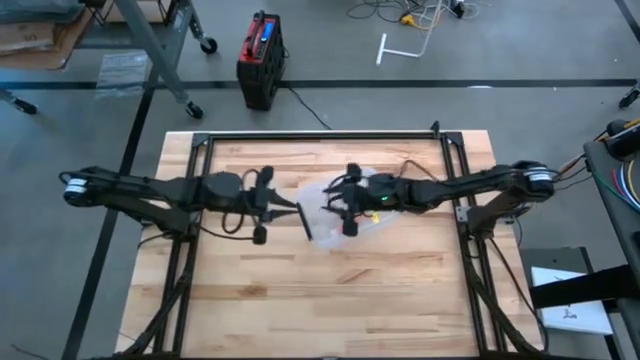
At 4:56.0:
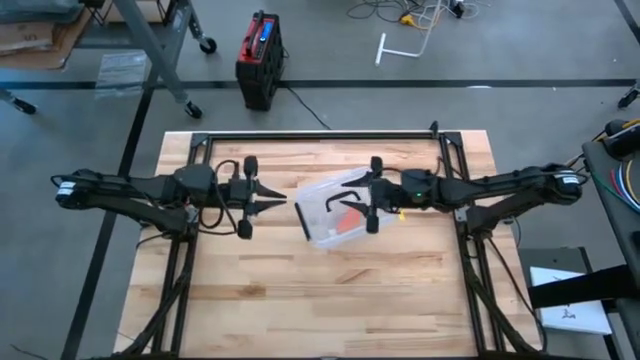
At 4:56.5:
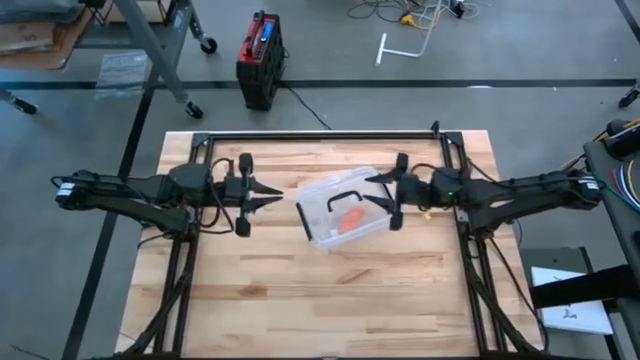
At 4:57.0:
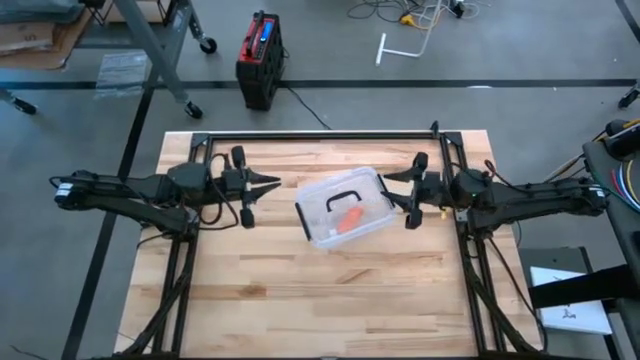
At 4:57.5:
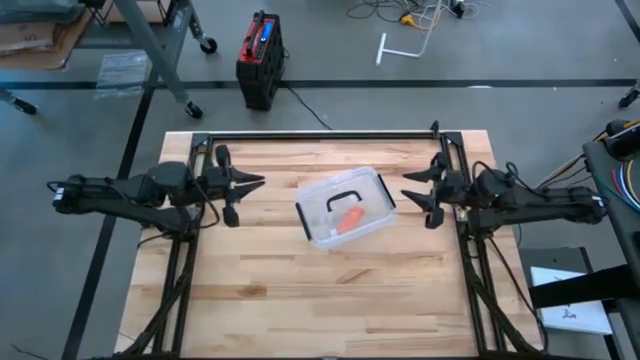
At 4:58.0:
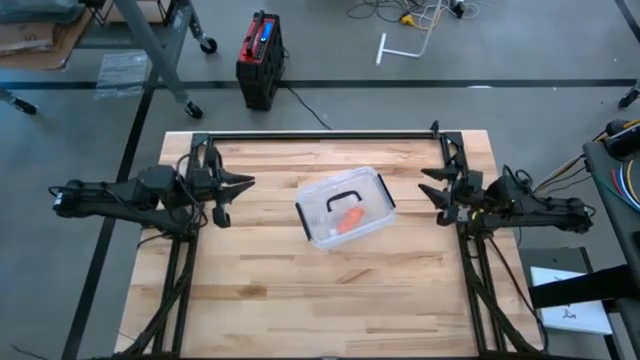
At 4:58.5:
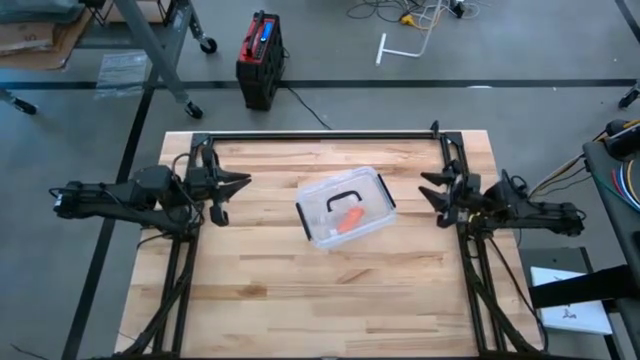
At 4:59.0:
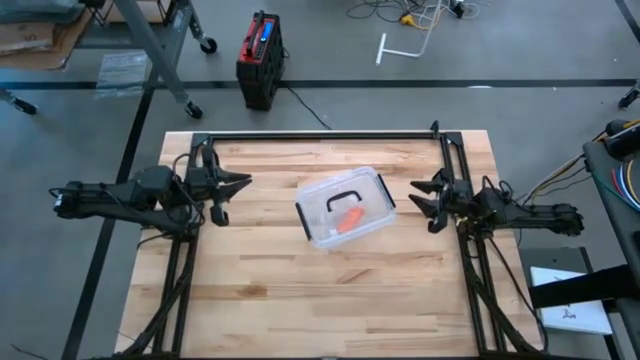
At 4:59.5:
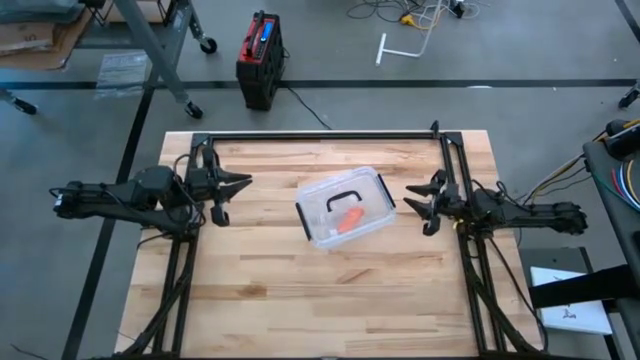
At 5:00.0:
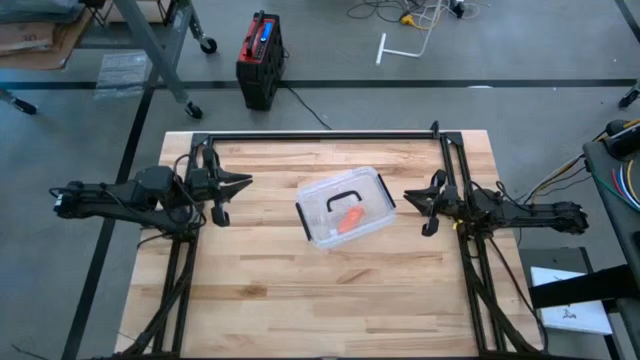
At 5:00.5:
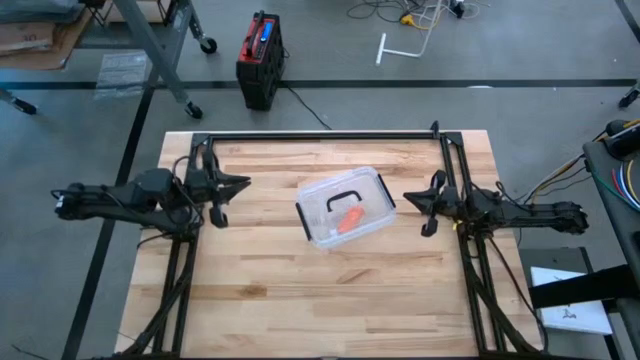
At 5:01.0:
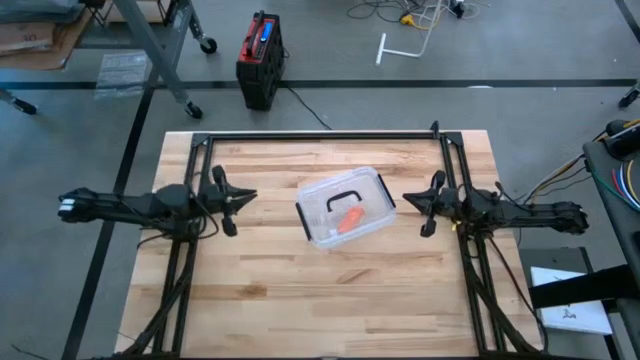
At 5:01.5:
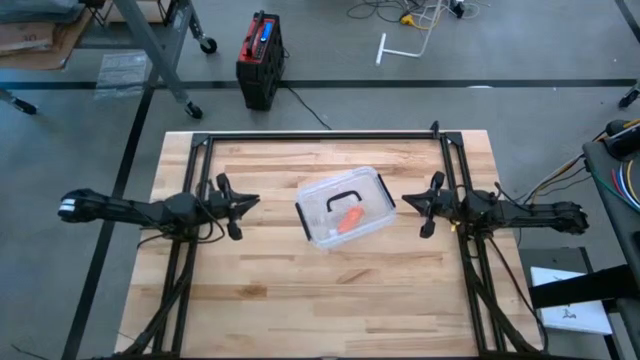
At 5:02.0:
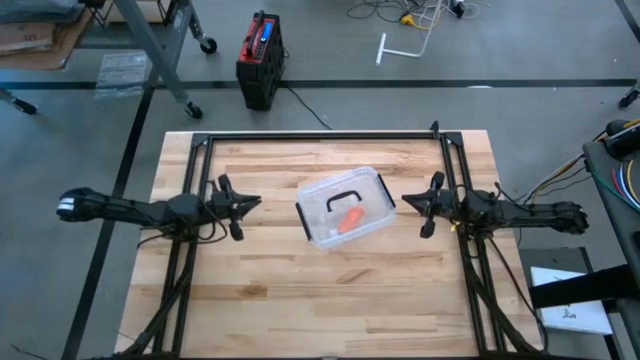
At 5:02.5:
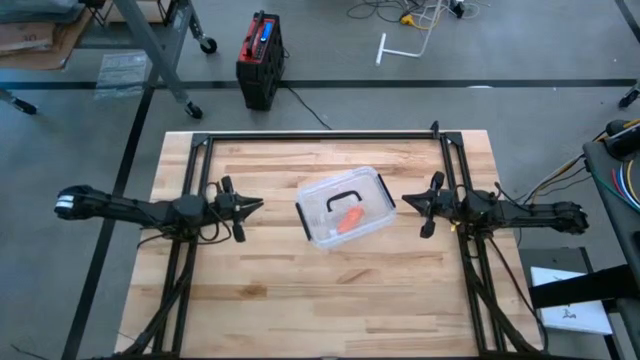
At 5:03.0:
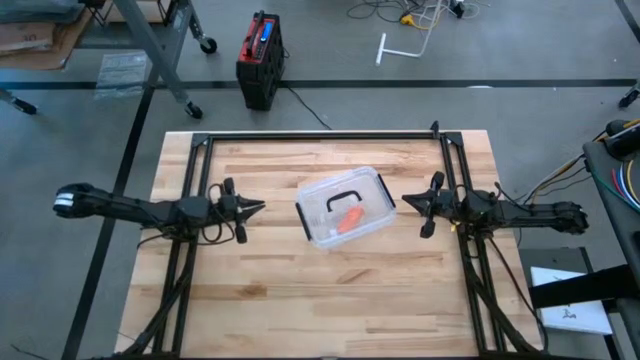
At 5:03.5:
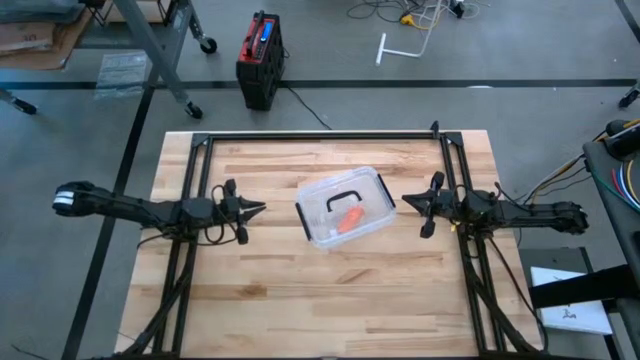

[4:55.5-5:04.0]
Task: Roll bandage
Return to Home Position

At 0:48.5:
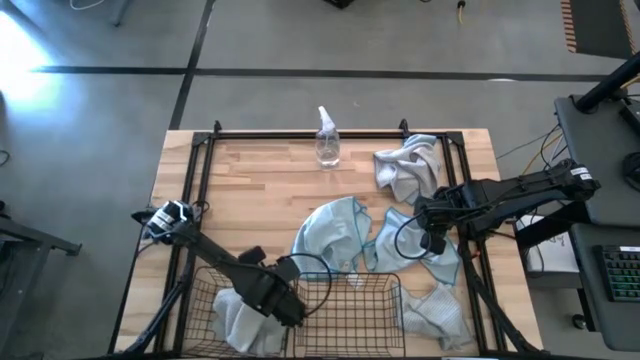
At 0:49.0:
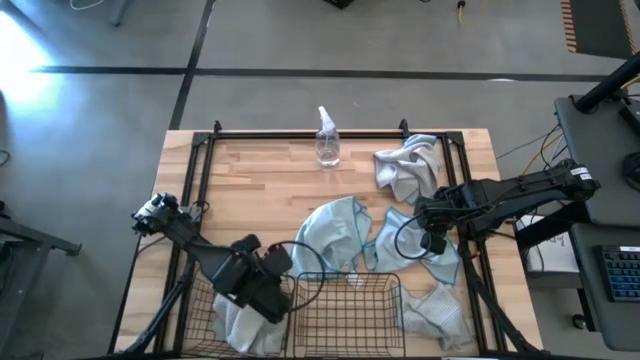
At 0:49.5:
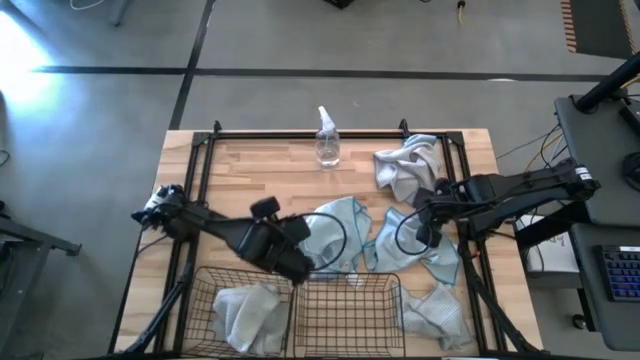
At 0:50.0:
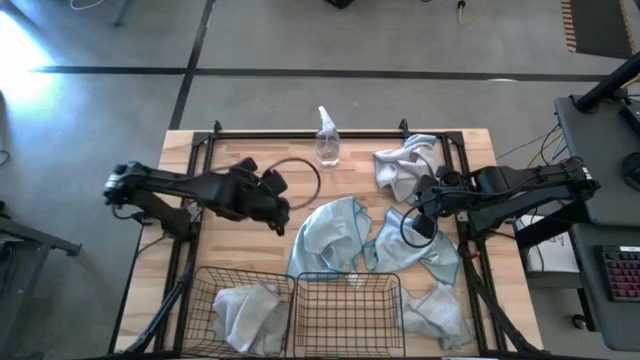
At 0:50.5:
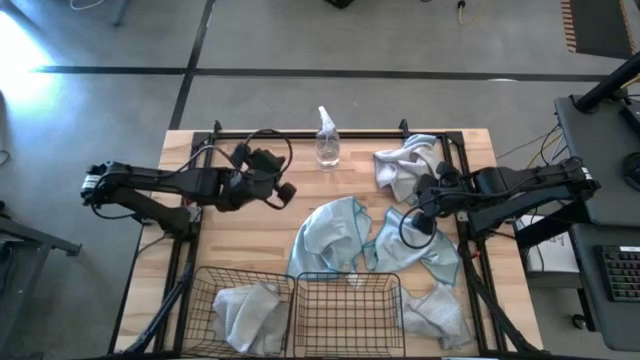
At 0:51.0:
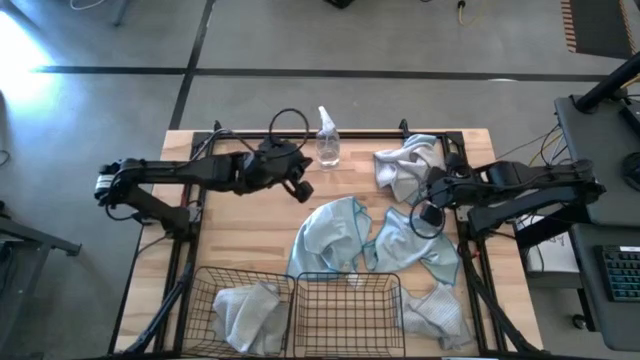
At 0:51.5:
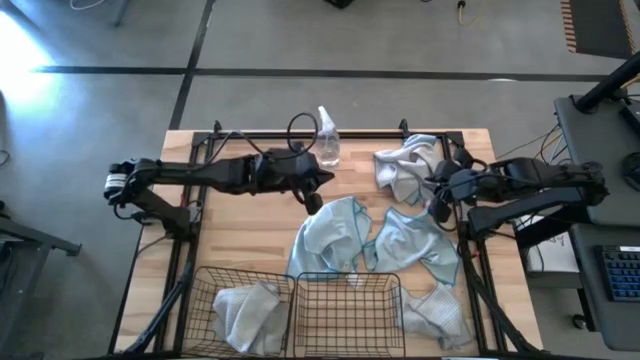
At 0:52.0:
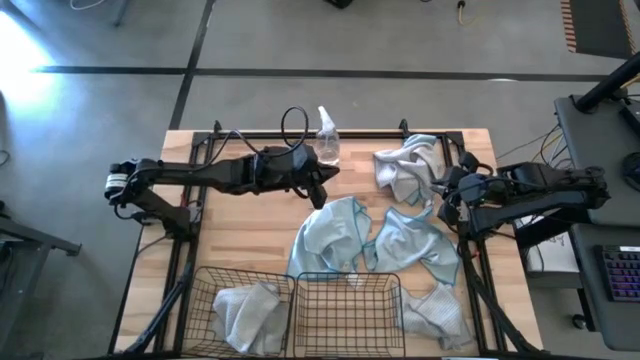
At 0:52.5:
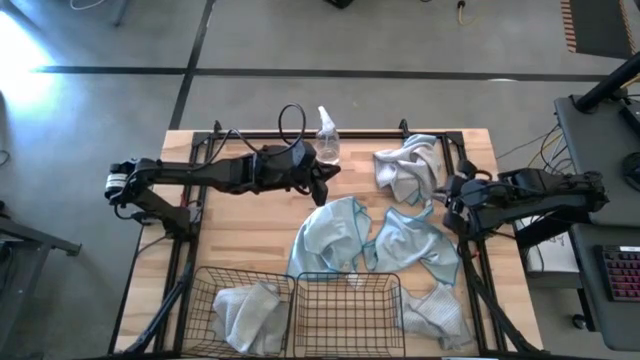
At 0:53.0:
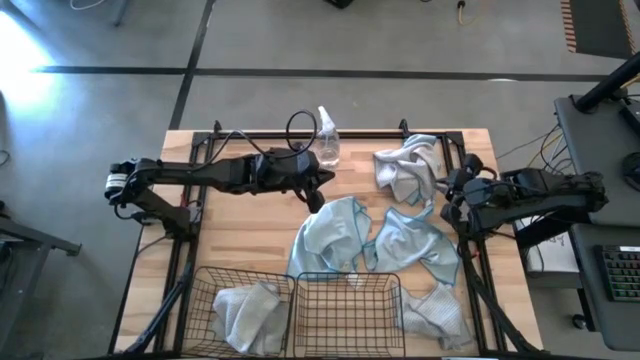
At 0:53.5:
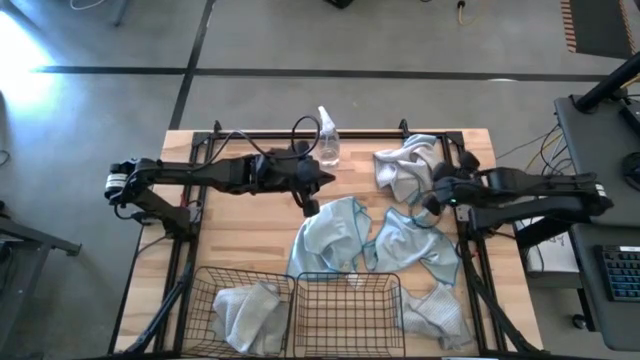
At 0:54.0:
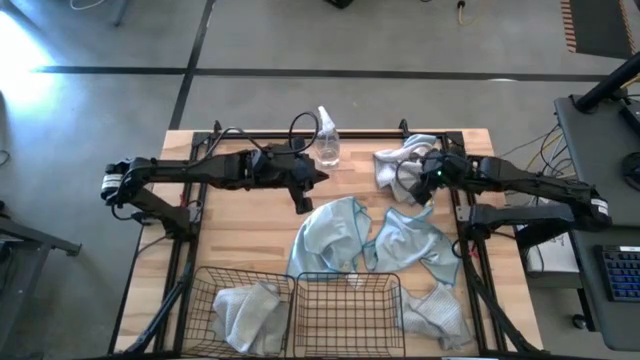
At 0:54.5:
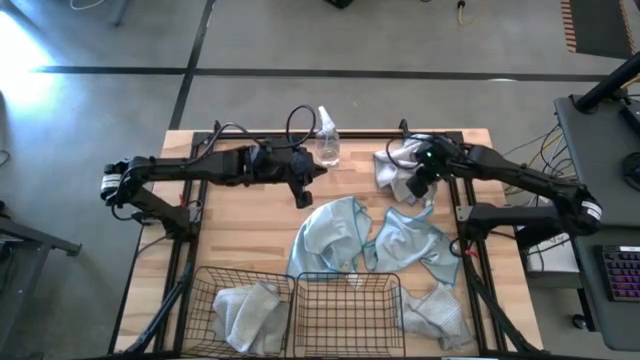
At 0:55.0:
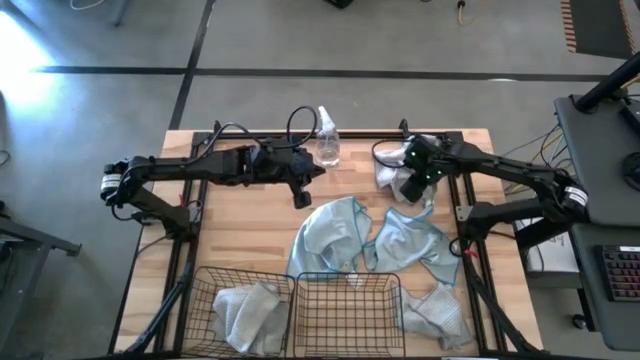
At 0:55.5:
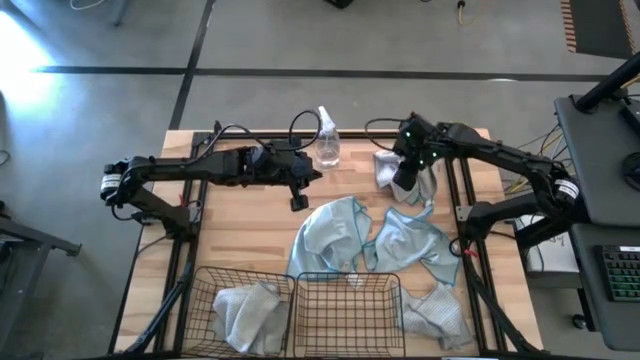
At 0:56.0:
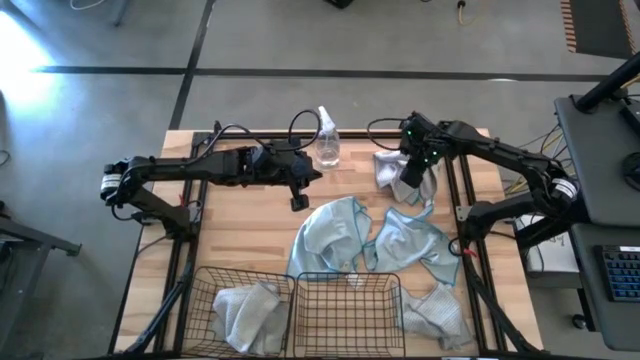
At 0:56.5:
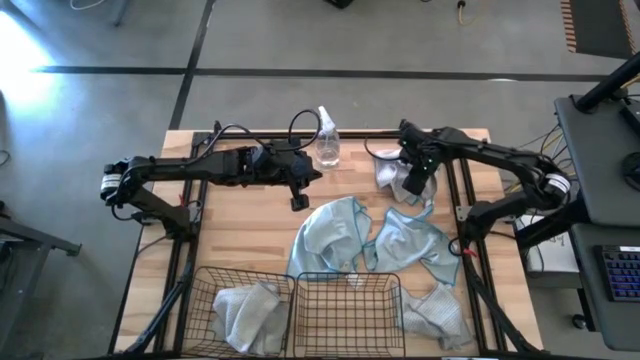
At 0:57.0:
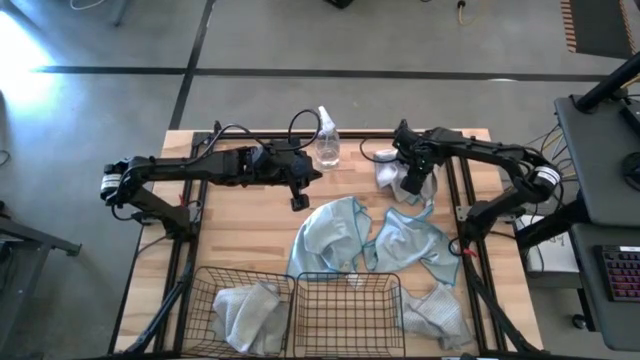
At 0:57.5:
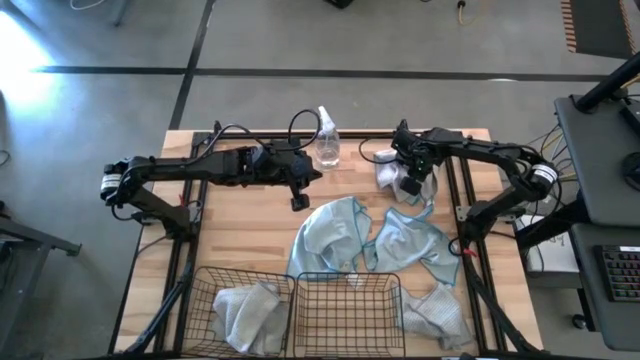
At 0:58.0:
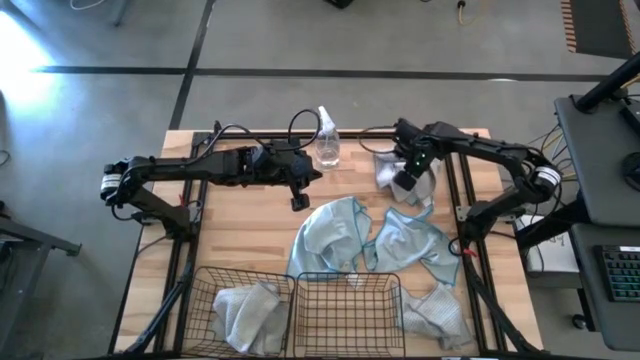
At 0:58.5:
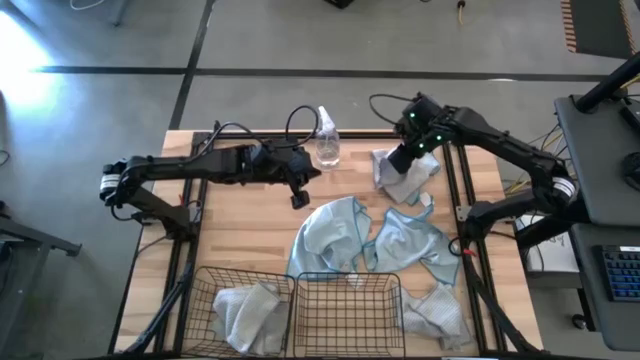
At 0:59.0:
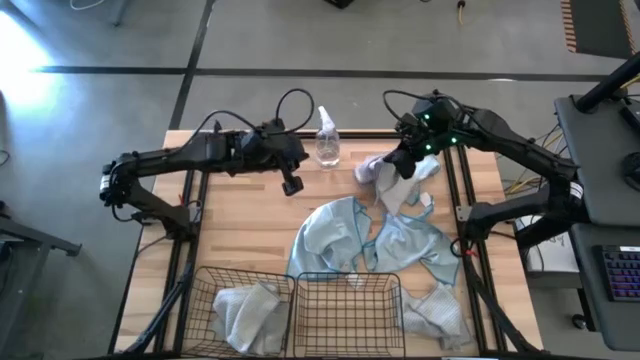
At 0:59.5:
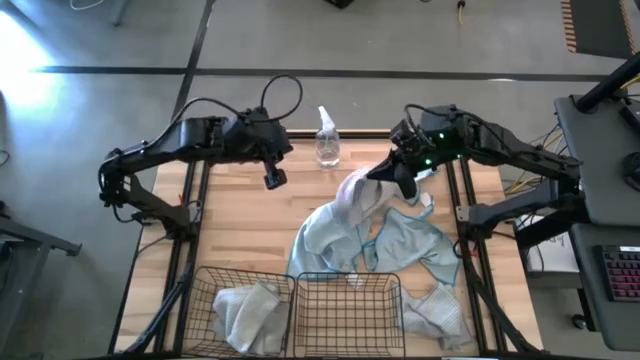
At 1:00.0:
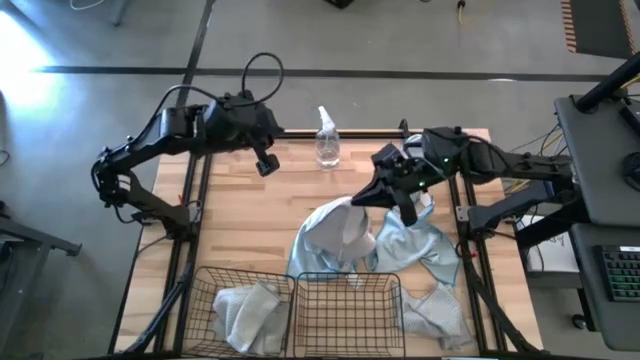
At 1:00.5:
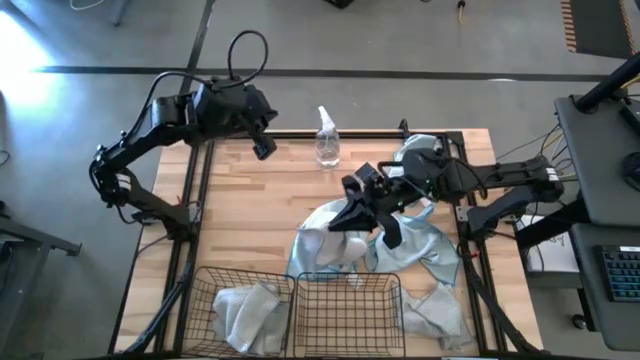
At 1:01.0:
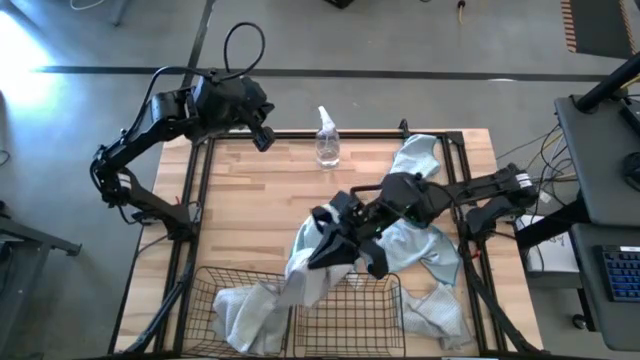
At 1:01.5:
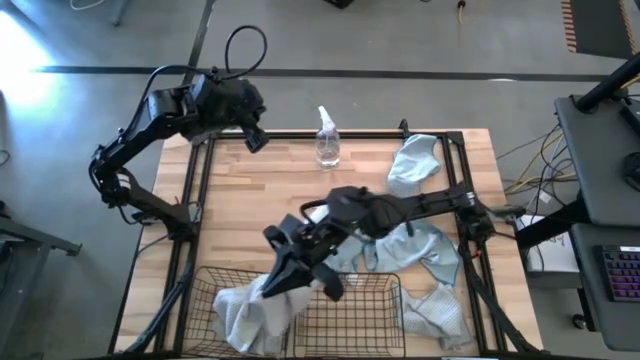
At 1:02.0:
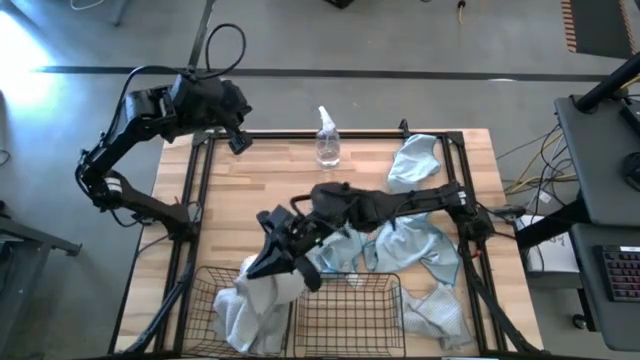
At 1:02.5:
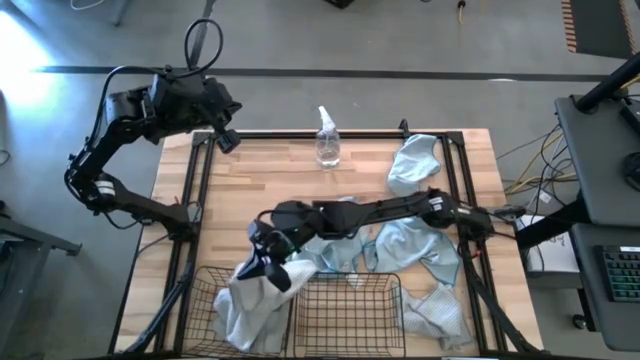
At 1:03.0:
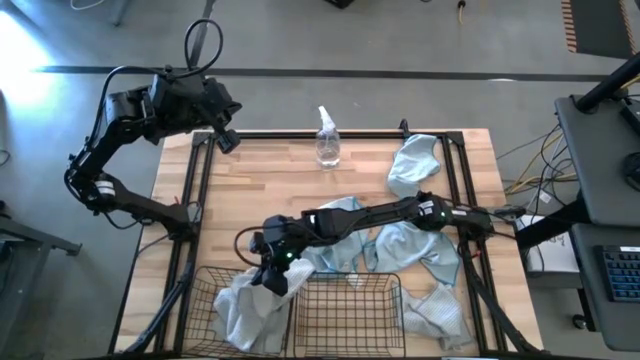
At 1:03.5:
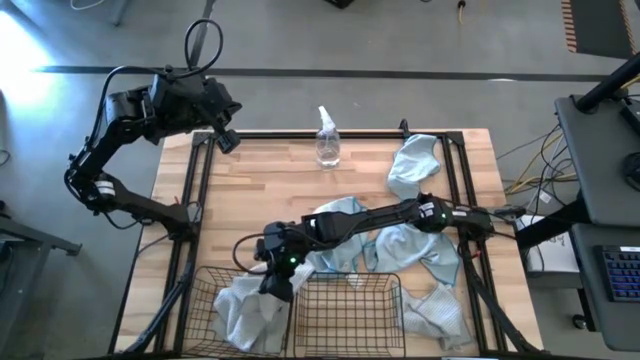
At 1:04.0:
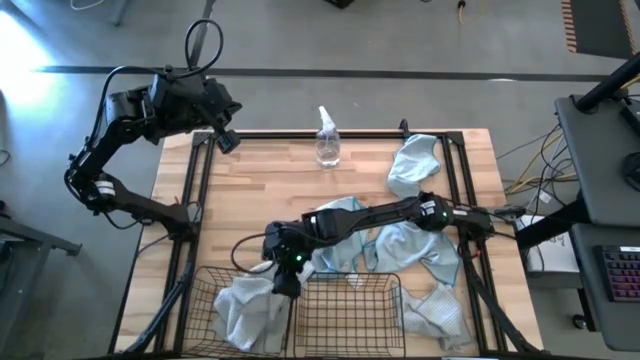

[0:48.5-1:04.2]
Task: Sort microfiber towel by color & place in baskets
Put the top gray microfiber towel into the left black wire basket
